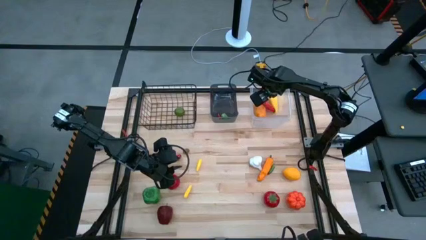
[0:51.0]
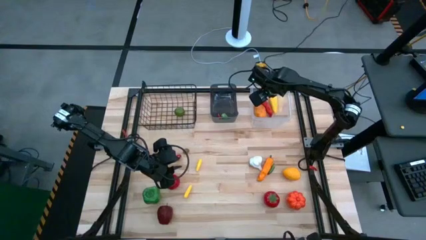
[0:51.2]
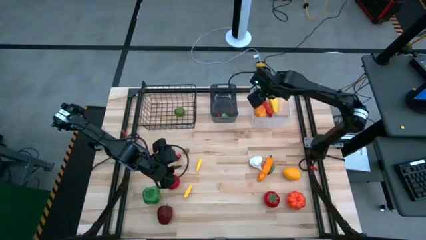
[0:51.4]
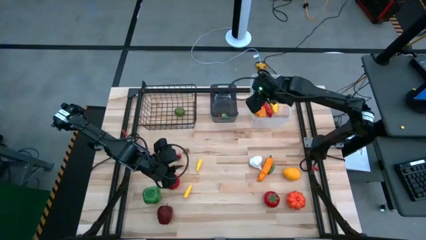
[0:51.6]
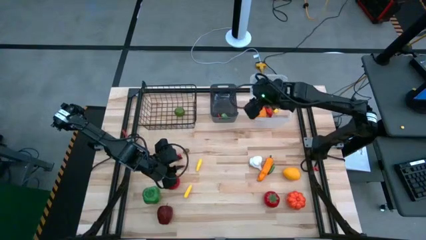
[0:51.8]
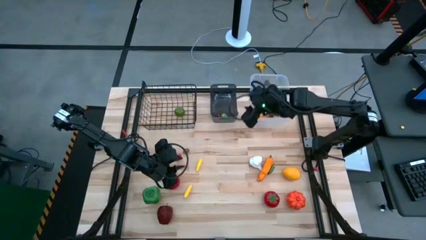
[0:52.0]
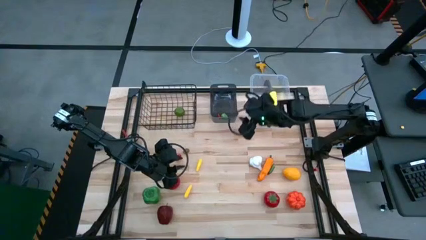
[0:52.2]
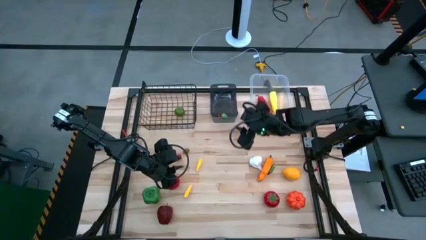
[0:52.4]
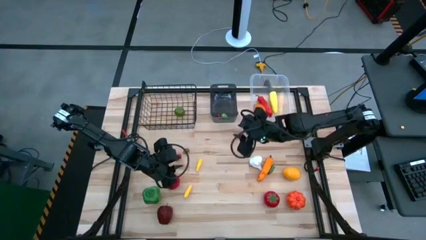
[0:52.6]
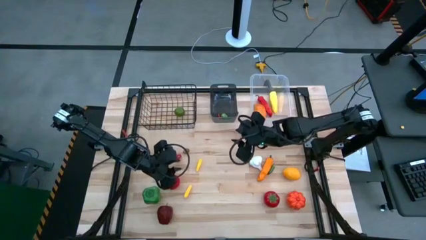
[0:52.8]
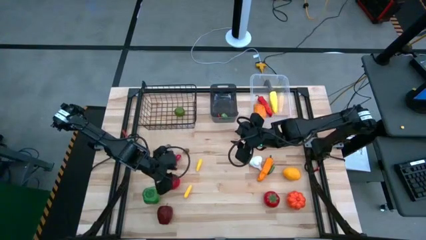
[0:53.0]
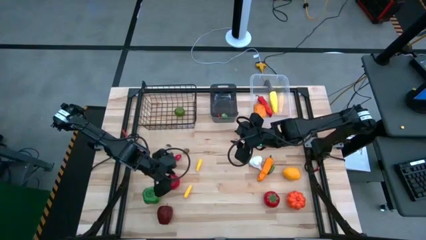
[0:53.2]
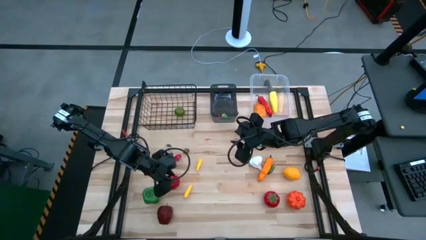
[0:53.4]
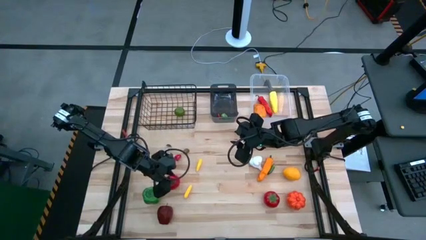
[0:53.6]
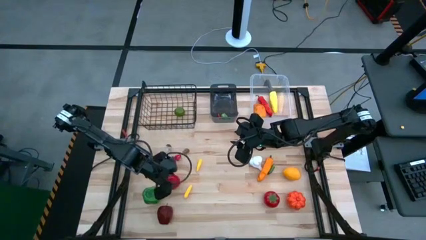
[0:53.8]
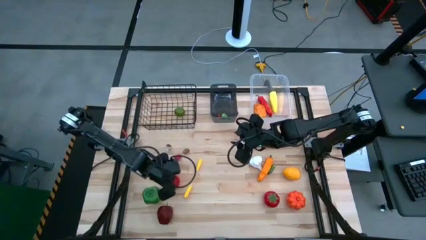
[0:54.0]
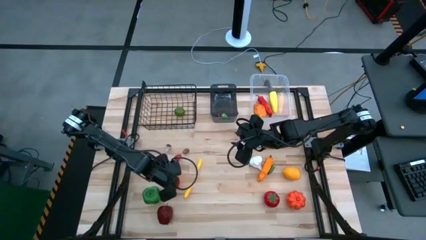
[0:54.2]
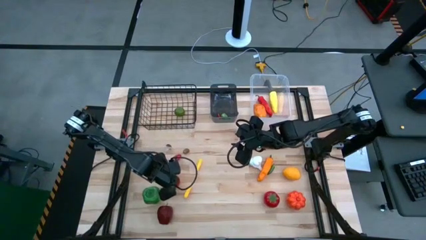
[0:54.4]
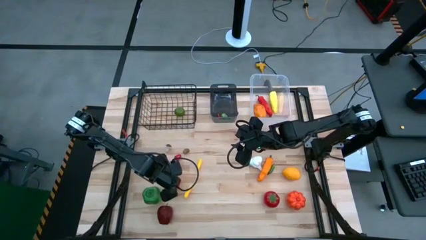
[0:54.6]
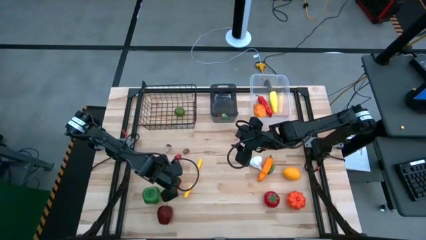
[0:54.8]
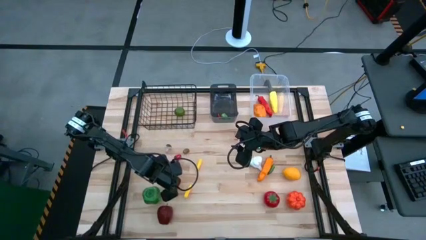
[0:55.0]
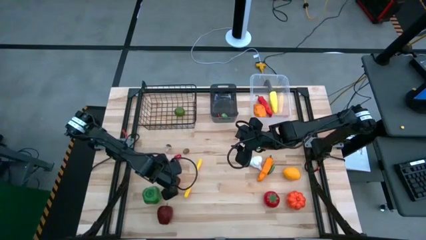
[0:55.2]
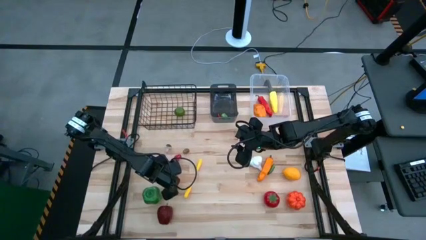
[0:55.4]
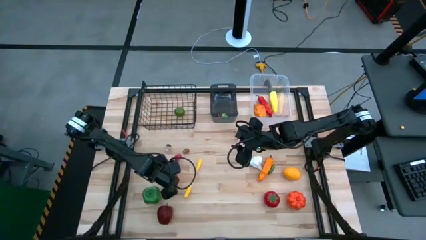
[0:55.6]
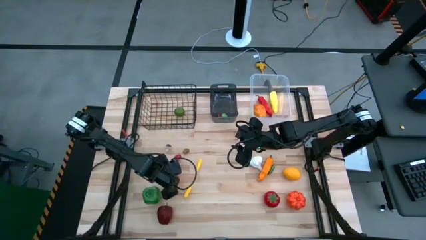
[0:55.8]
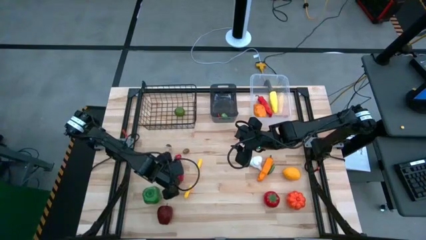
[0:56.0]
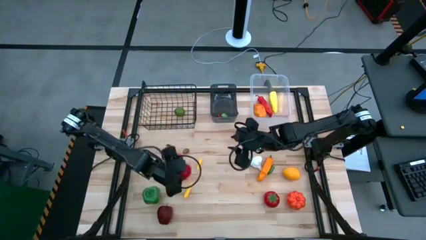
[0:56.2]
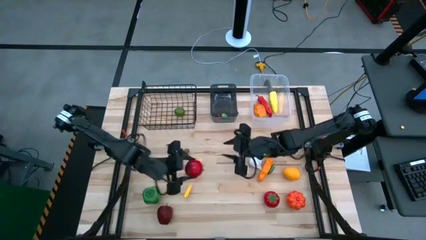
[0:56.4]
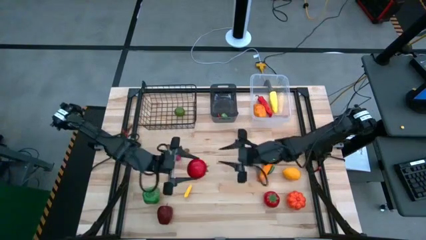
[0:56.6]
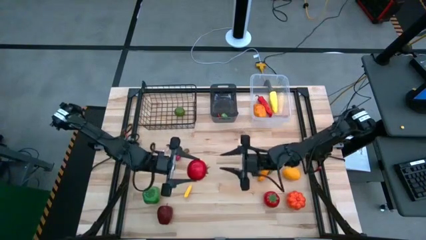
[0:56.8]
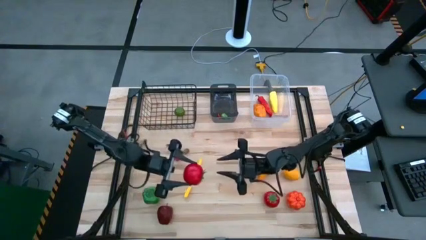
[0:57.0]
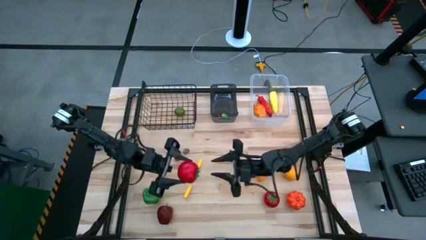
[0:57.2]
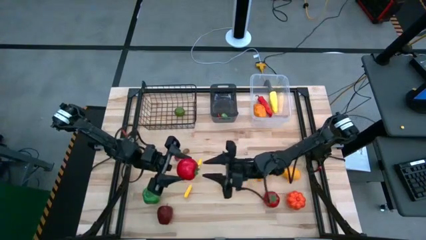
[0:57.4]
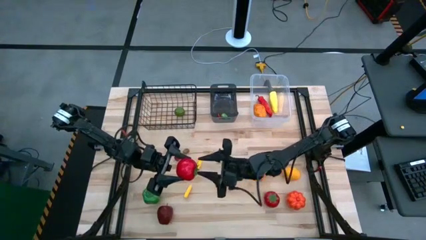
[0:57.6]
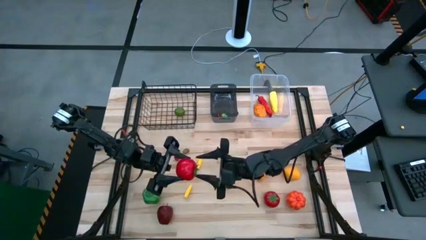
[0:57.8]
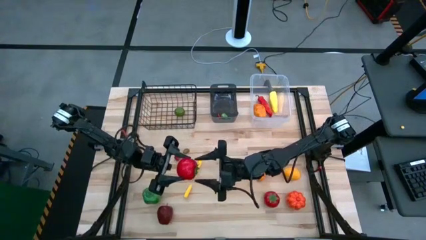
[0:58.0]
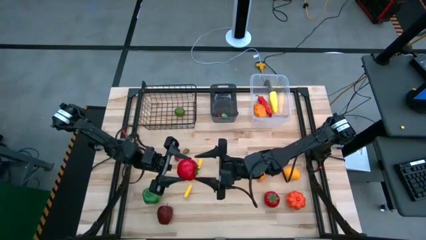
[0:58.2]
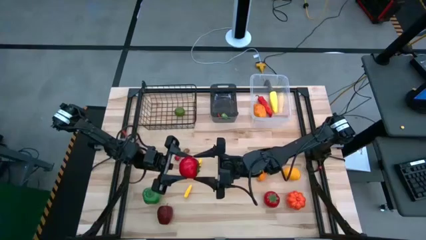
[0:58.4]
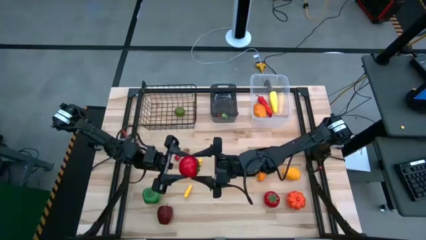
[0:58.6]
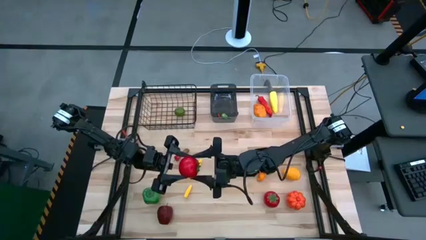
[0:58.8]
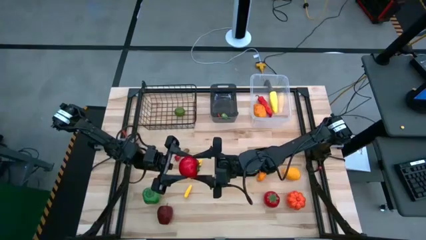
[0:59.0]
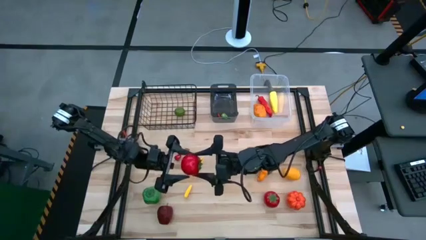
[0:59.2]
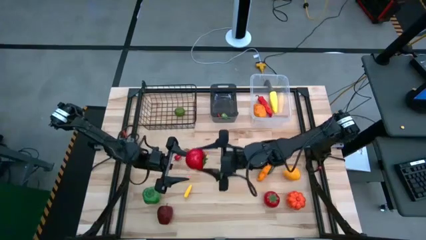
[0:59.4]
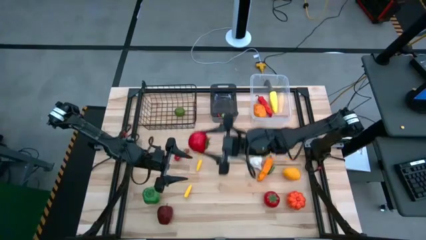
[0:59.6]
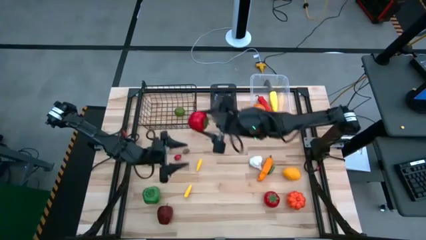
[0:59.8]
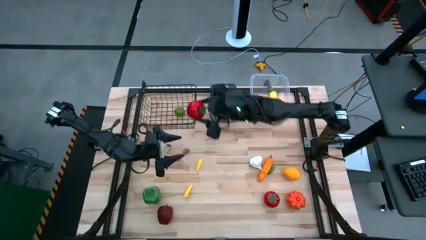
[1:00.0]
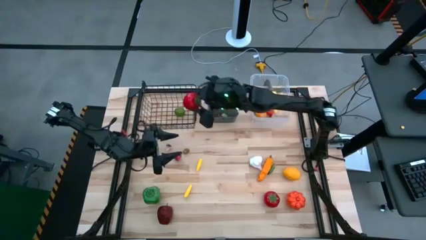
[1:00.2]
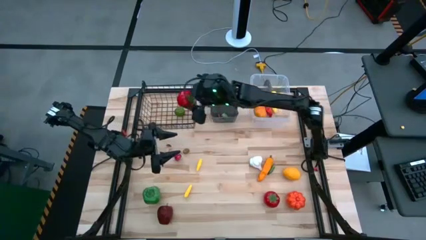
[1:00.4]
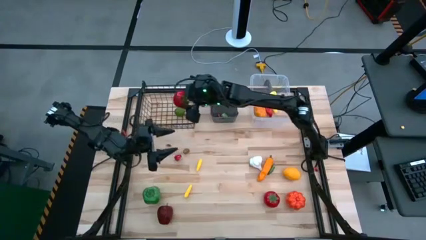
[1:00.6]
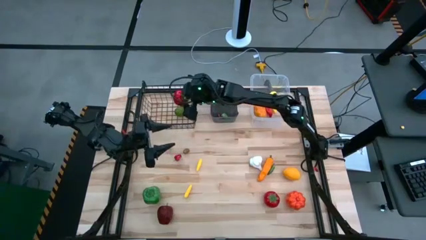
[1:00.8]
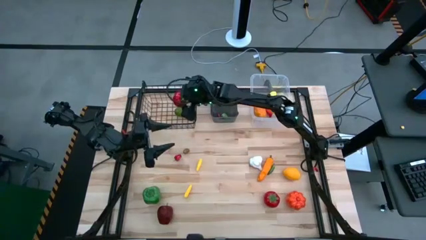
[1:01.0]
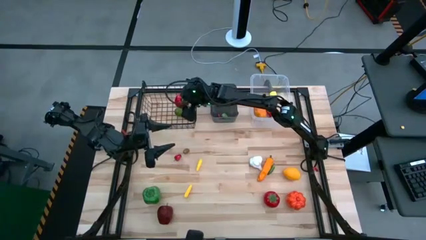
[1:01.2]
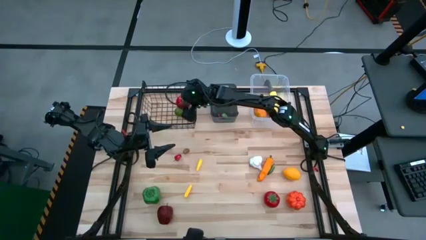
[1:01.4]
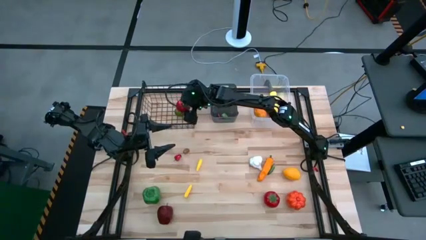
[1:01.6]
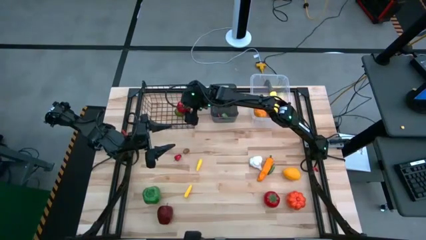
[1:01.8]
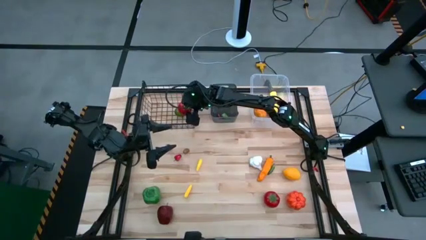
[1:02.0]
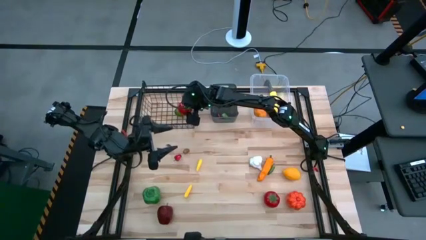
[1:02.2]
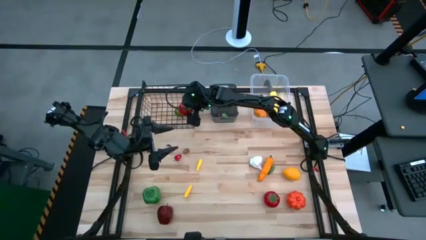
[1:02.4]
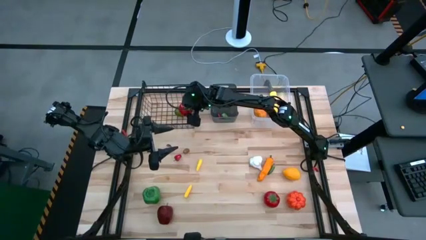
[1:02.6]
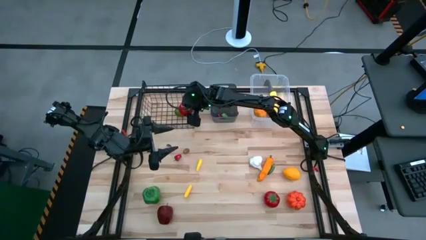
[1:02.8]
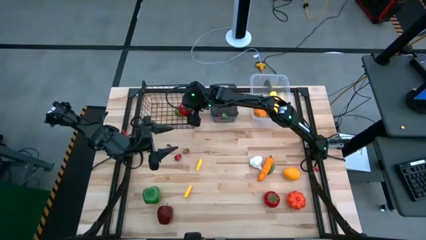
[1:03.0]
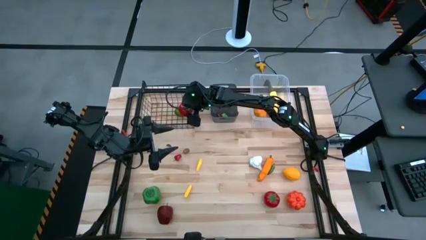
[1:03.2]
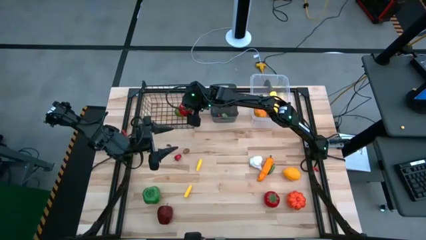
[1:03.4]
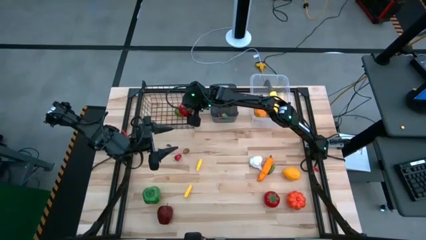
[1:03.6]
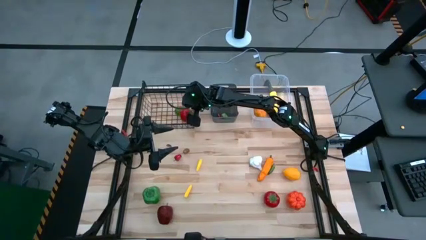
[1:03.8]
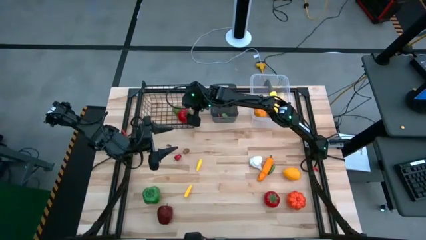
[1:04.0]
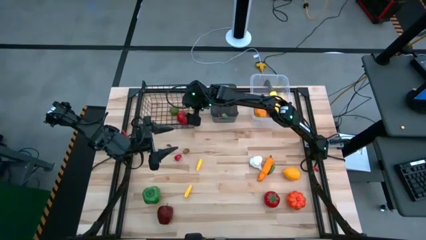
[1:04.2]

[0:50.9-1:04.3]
Task: Sort produce into baskets
Put the right tomato into the black basket

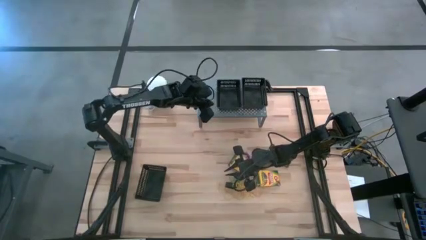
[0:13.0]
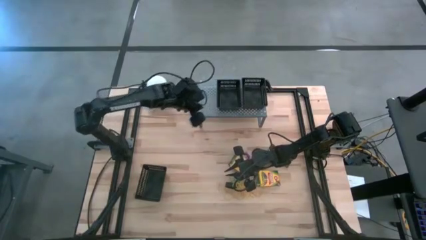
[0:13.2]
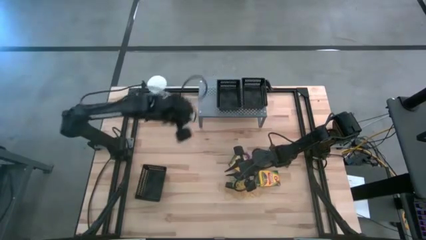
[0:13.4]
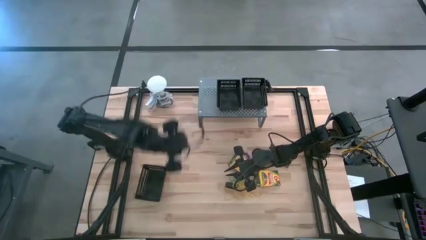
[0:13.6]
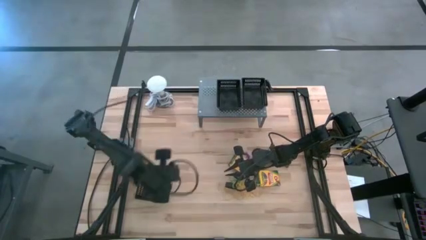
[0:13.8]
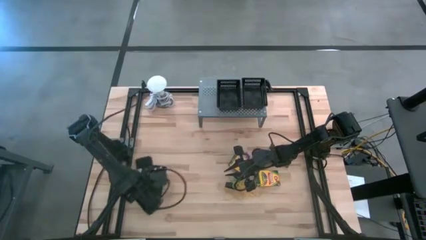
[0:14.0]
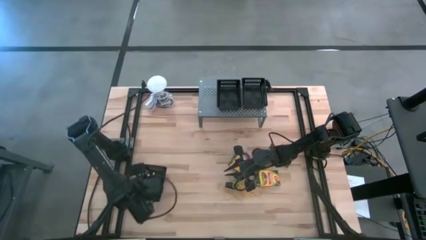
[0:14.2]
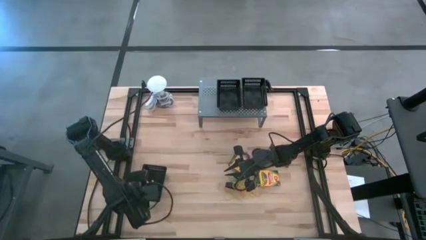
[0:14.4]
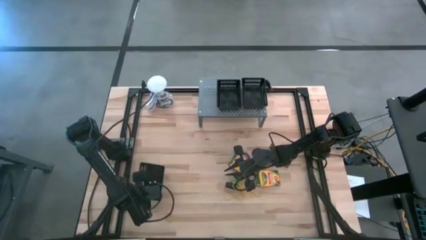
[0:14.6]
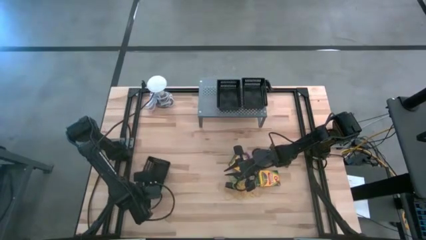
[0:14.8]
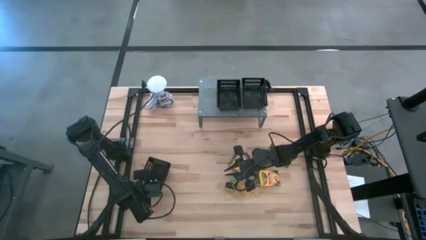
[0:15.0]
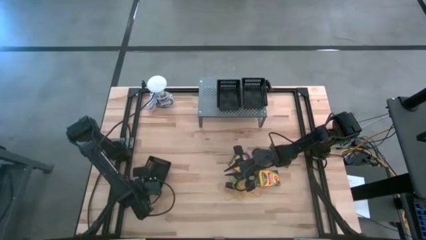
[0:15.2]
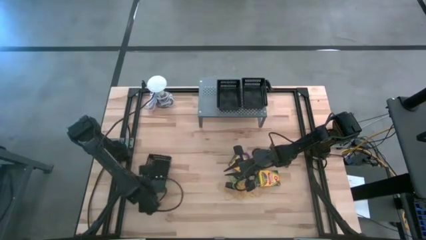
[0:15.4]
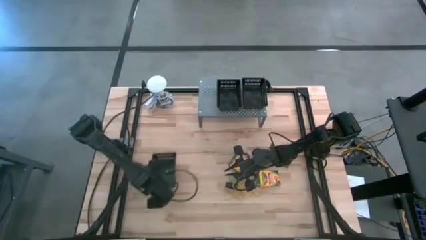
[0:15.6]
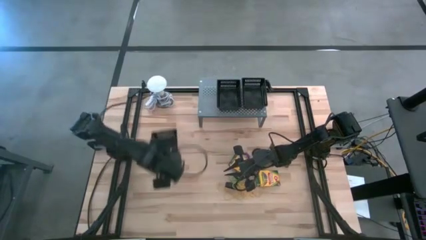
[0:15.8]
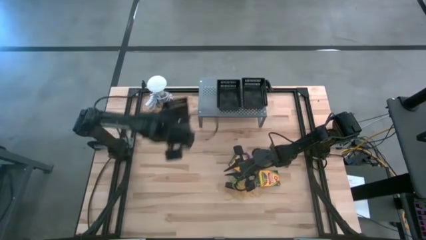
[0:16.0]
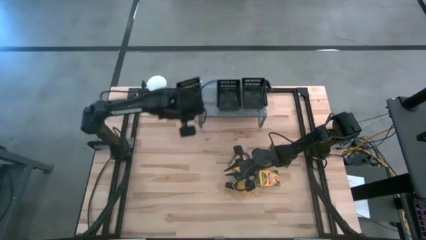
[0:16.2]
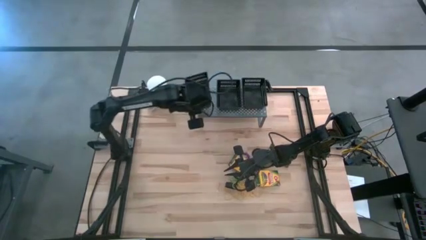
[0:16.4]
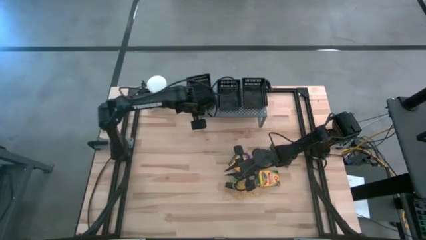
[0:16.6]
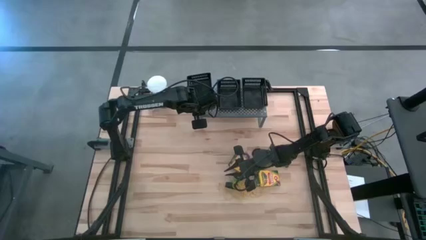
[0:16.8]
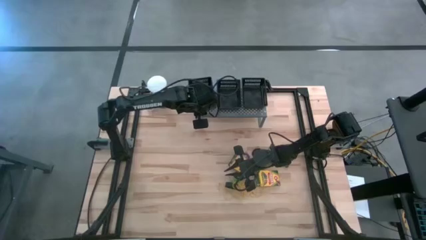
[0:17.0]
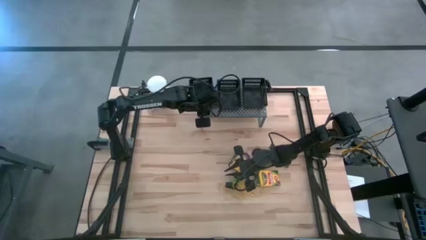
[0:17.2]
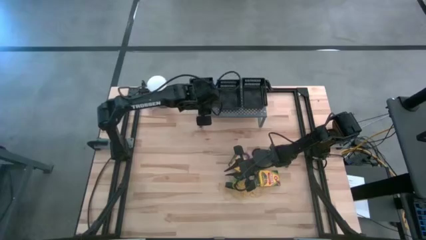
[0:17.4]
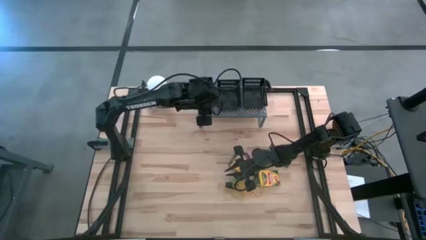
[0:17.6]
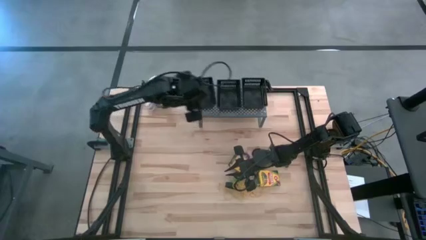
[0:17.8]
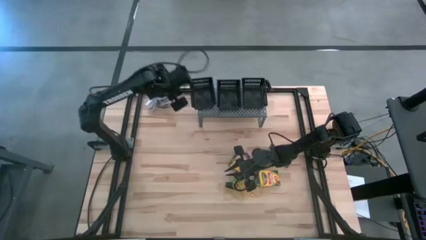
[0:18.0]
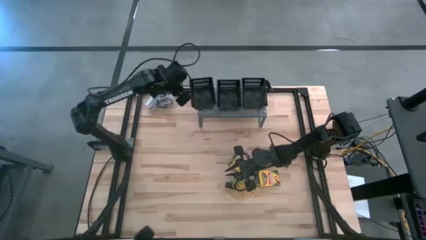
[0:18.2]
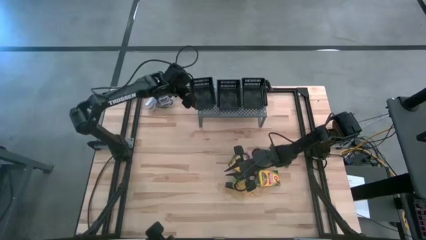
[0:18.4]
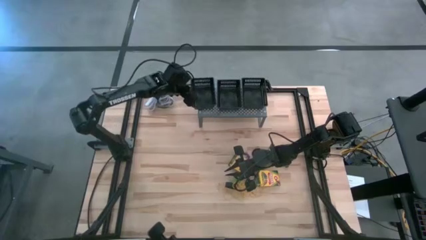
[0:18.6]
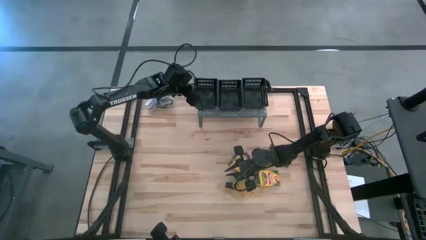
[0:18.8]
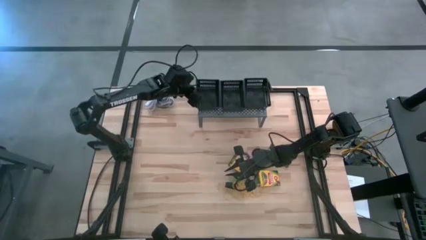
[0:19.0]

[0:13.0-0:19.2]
Task: Pick & Place Office Desk Supplies
Put the black bin on the shelf
